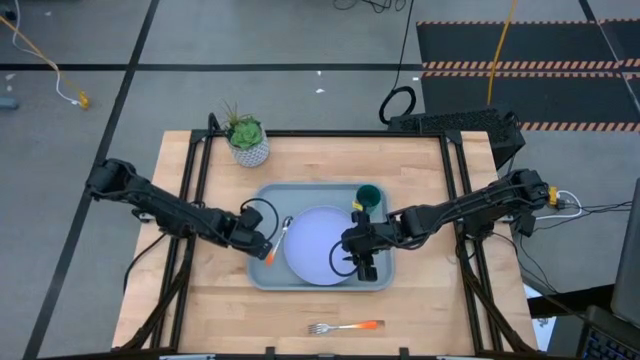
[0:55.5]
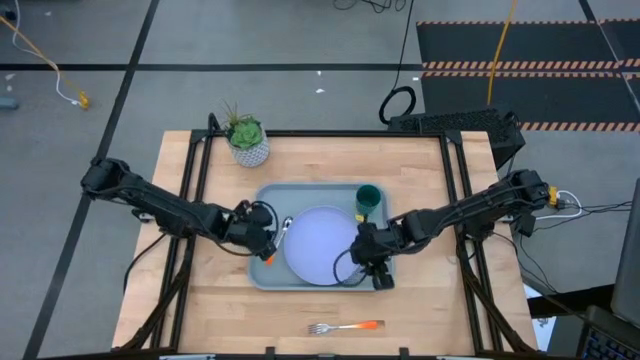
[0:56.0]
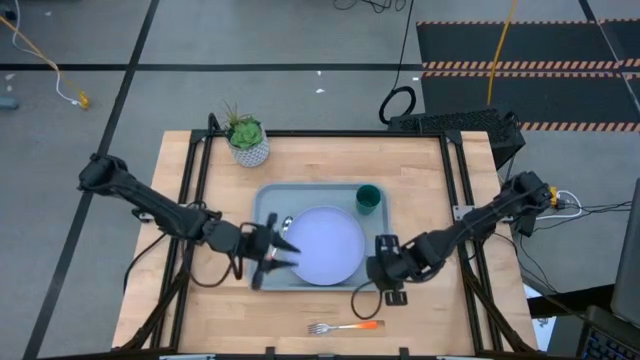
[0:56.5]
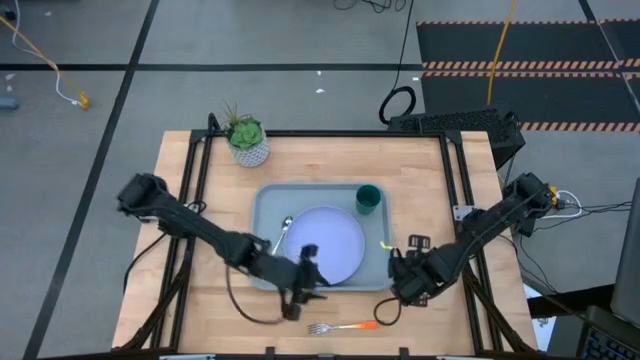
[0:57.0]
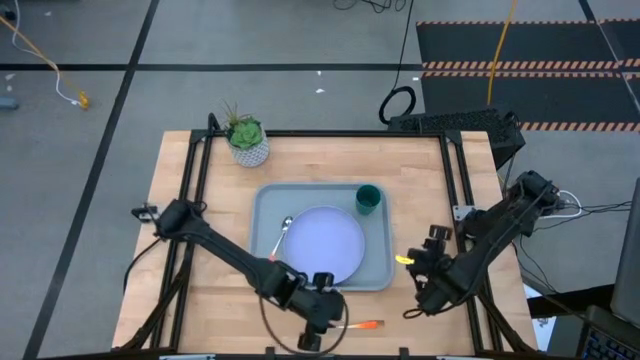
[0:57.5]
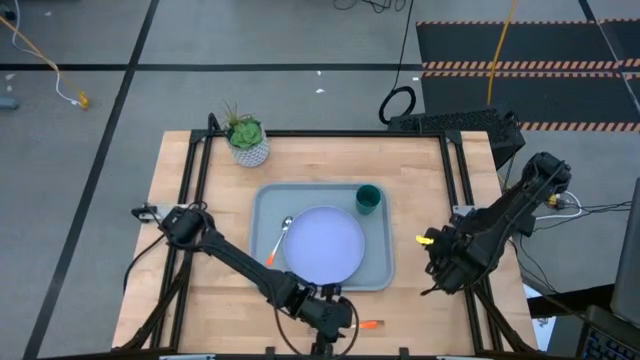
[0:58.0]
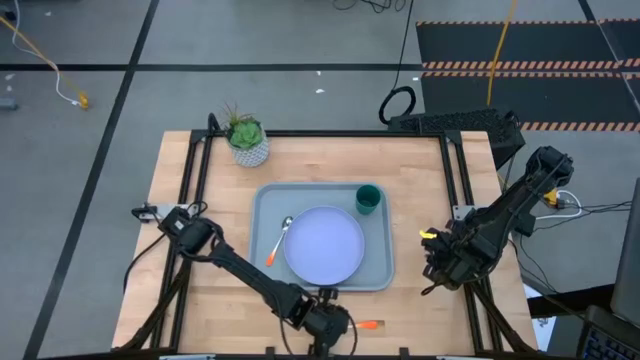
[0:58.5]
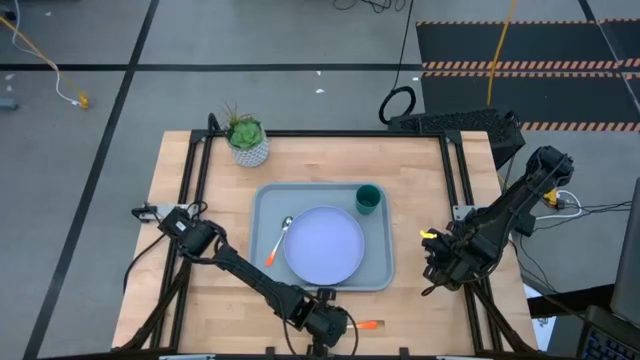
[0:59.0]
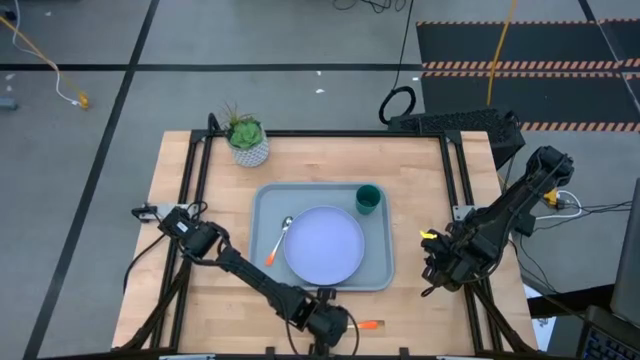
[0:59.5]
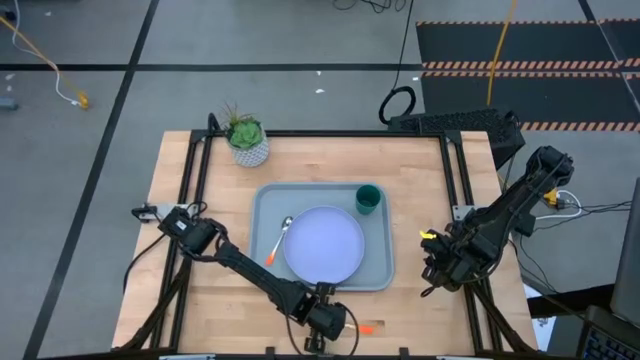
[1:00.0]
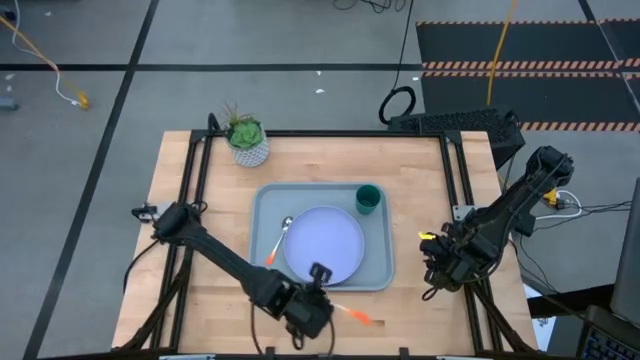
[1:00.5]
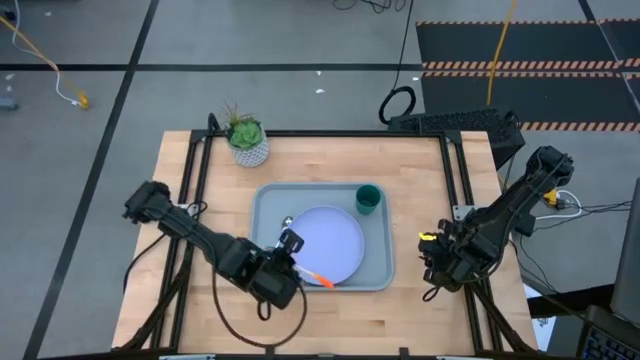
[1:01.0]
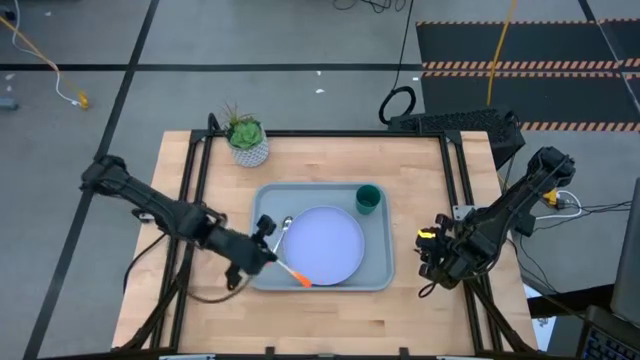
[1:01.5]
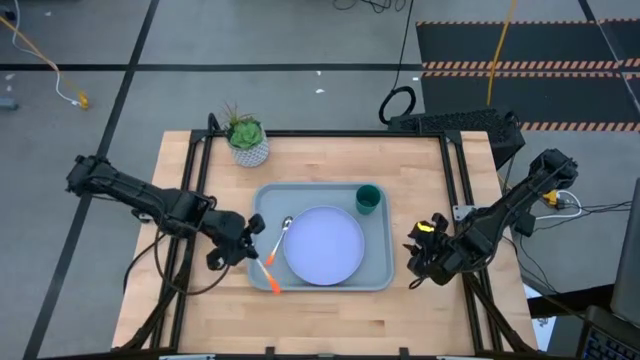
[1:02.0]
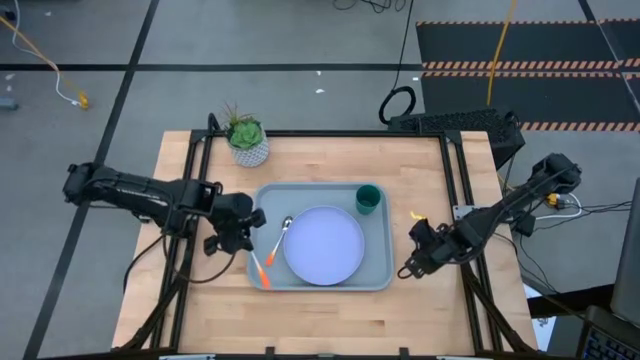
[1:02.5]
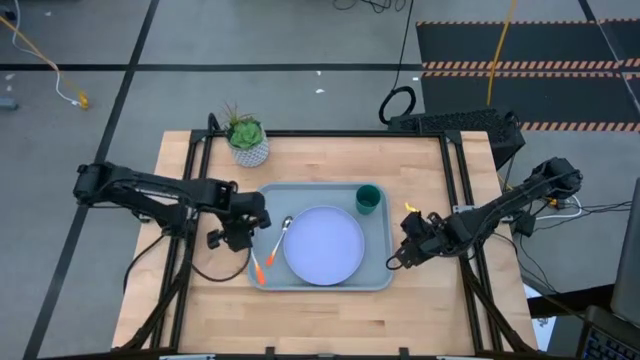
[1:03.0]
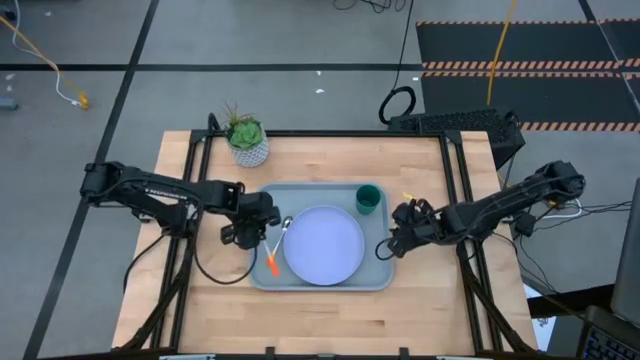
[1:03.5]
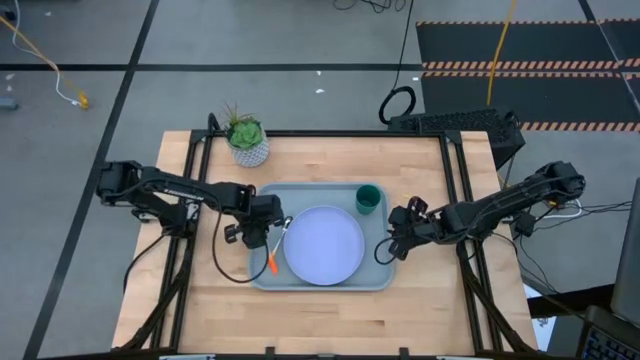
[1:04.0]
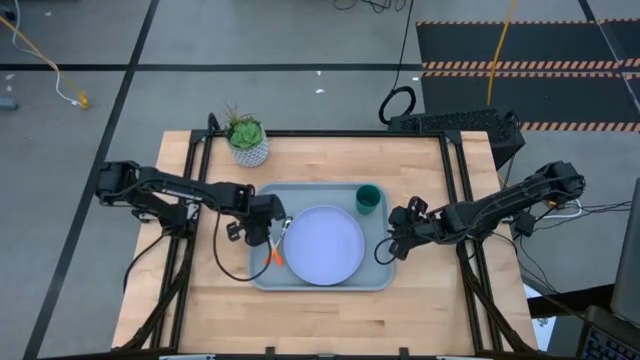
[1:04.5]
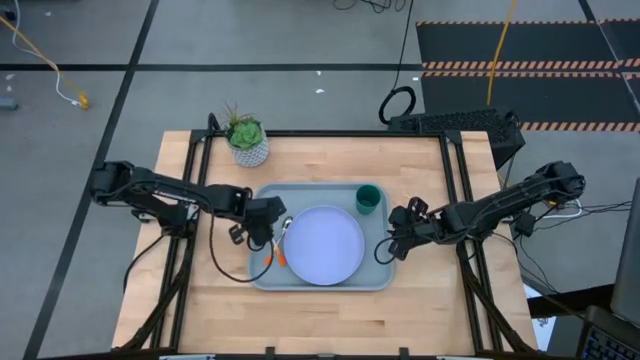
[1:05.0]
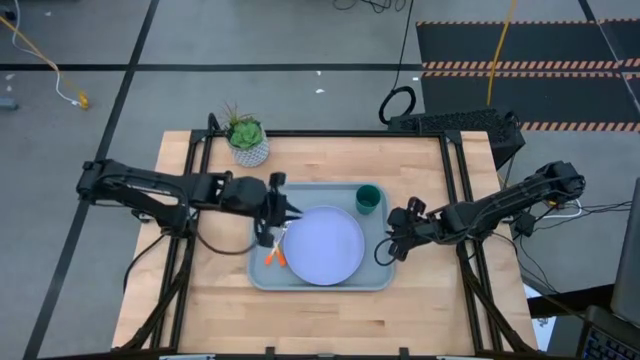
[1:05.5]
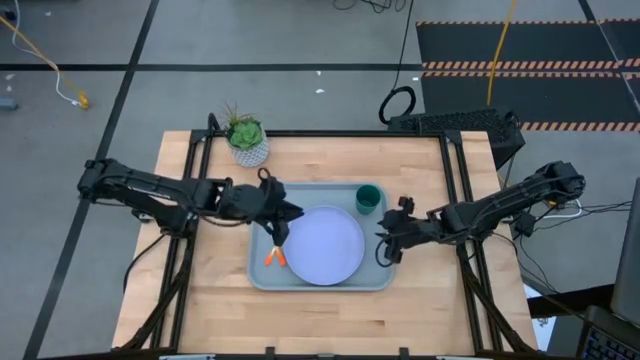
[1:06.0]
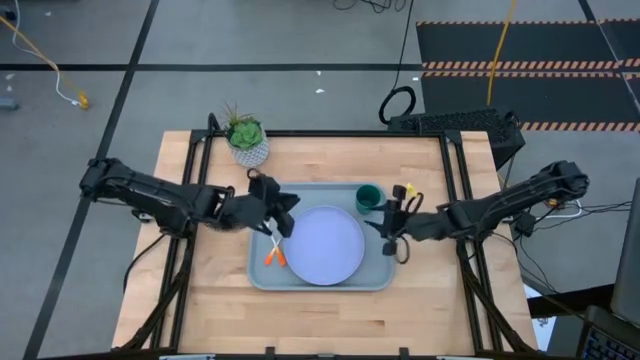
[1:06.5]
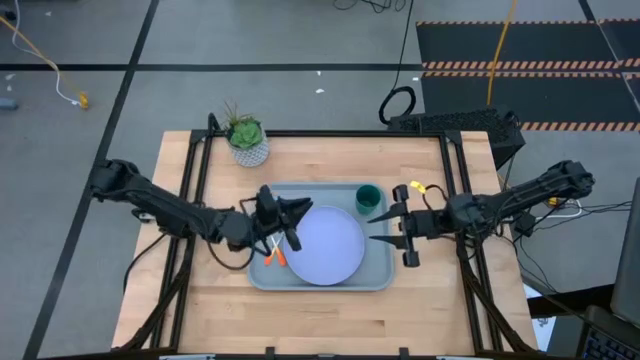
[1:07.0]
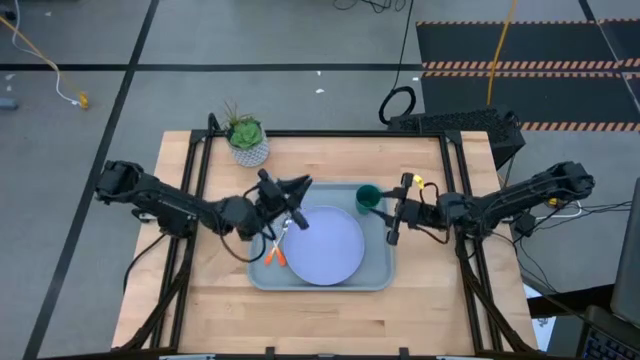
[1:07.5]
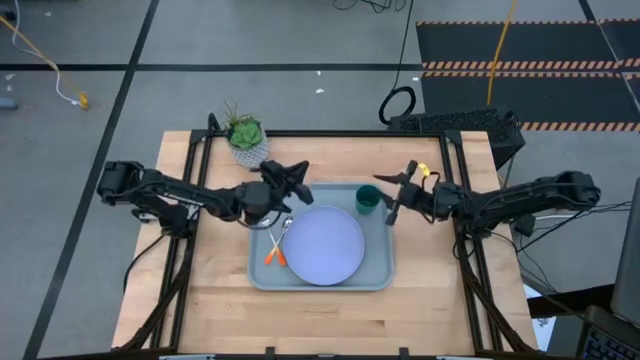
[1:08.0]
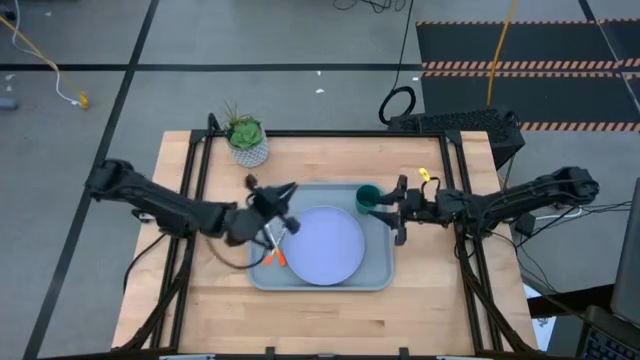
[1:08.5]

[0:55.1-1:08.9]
Task: Pick and place plate/cup/fork/spoon on tray
Put the orange fork to the left of the orange spoon on the blue tray

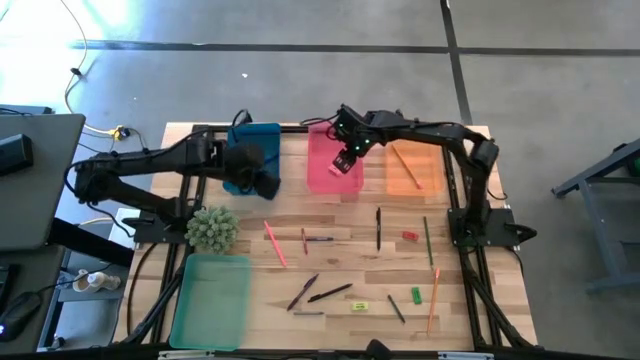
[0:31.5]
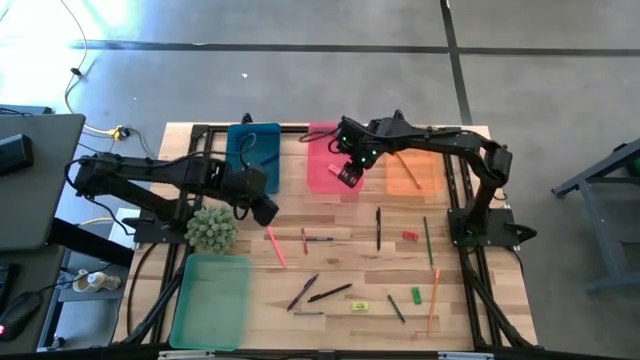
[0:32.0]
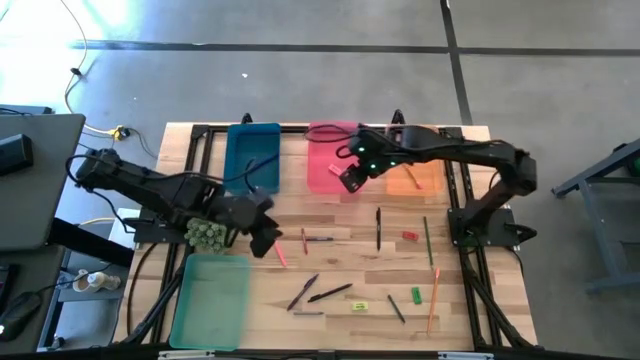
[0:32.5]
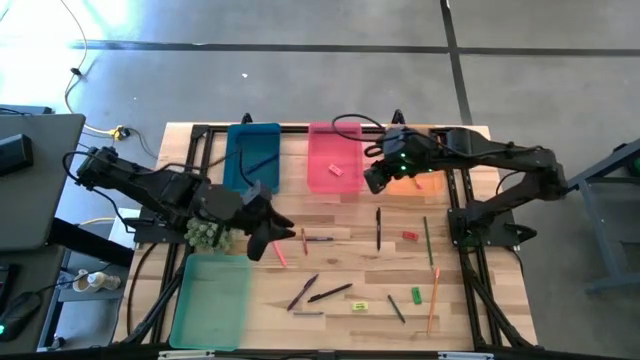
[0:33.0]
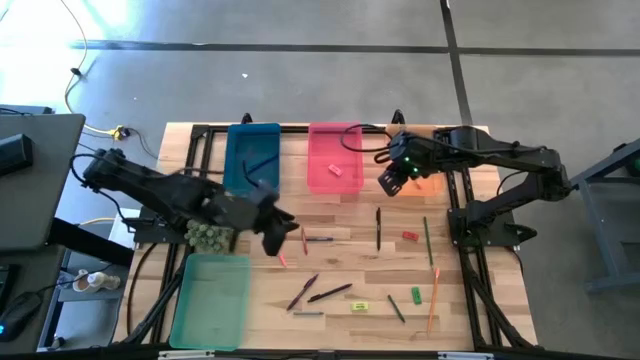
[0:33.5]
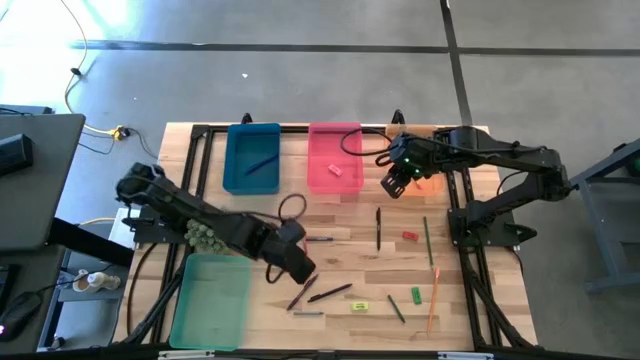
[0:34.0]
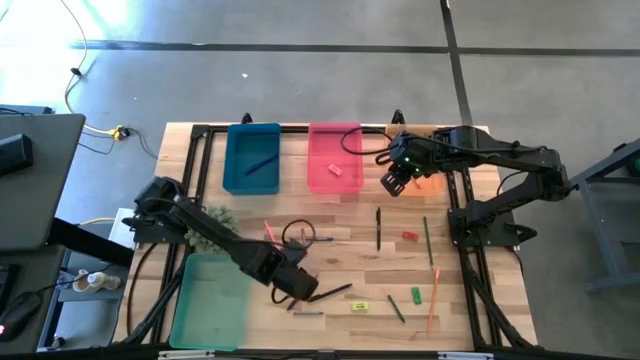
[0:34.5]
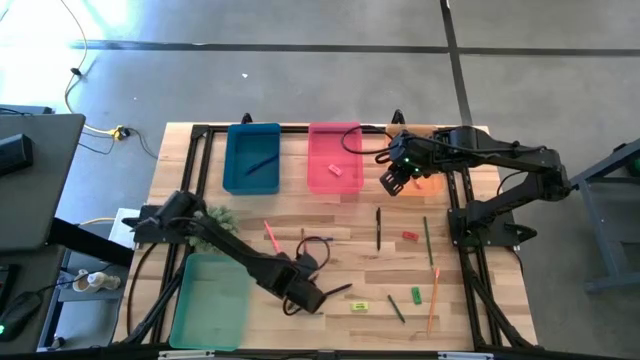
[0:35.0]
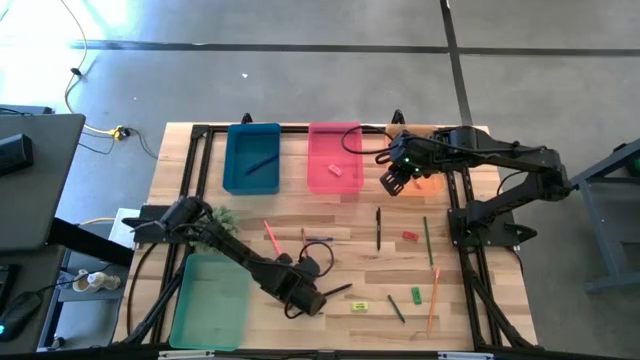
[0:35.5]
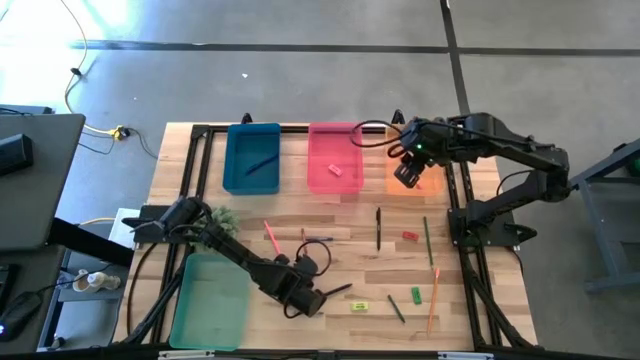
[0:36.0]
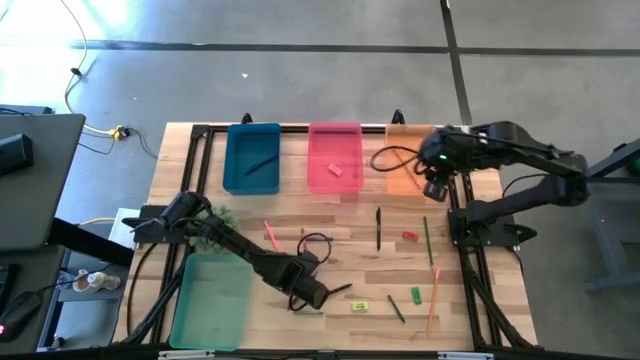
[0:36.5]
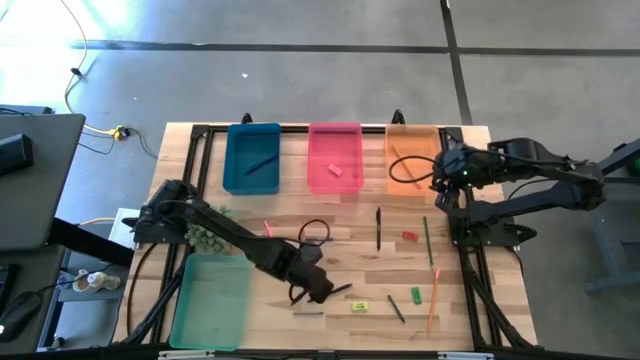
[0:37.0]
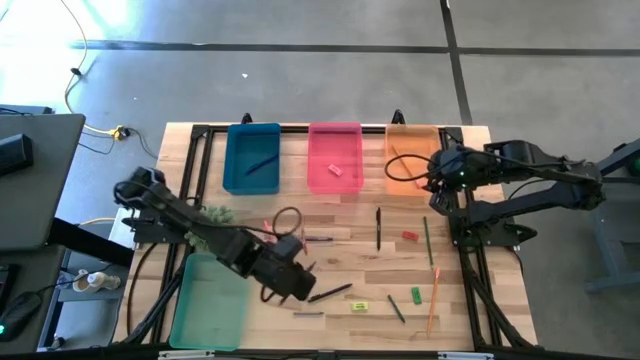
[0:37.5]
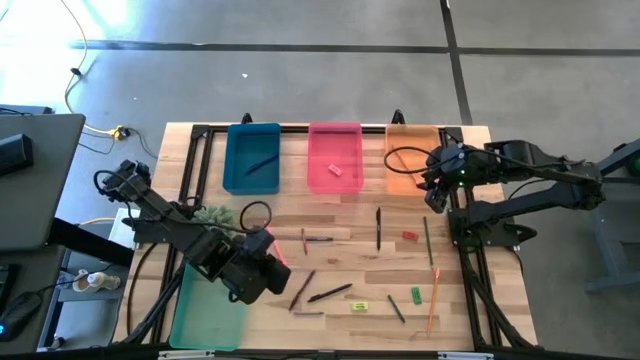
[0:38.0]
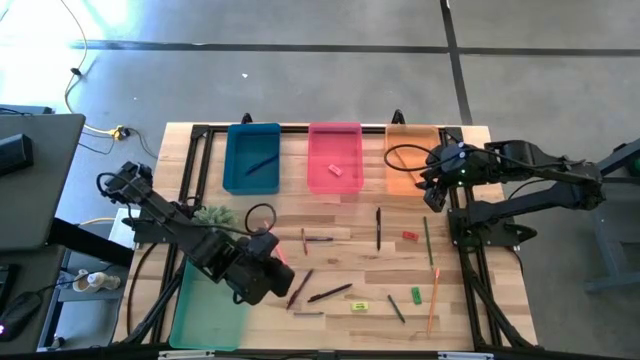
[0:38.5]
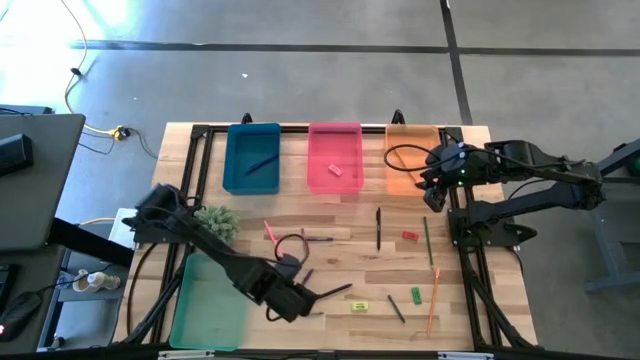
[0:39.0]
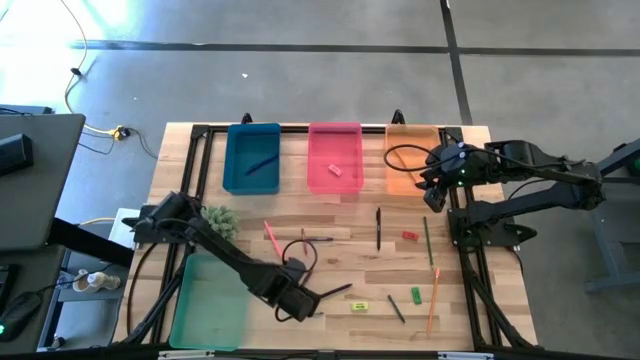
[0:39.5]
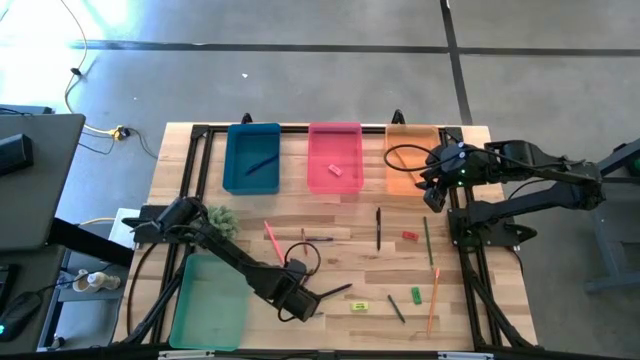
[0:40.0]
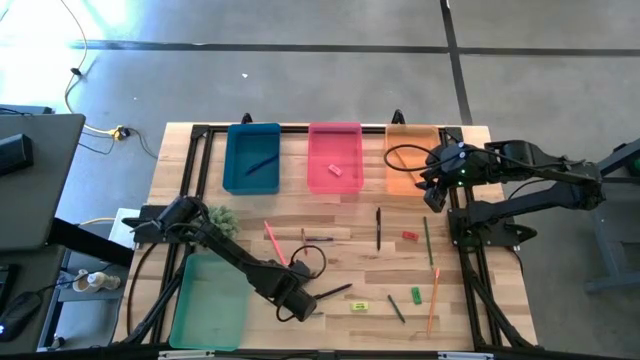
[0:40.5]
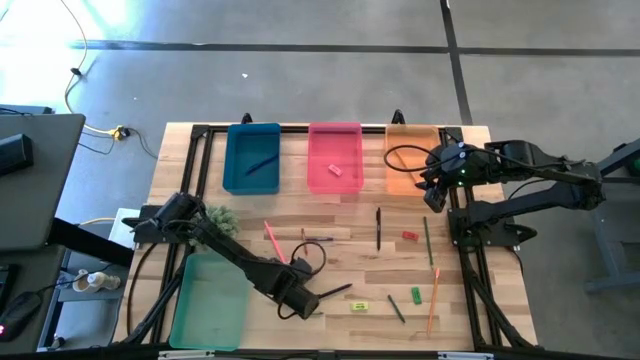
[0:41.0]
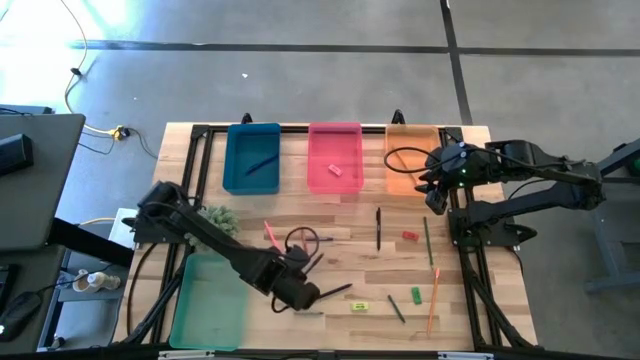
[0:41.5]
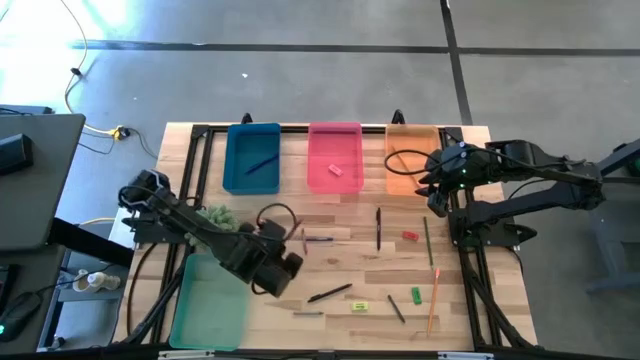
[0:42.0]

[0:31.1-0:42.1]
Task: Sort crayons/erasers/pens/pencils in bins
Put the violet pen into the blue bin
